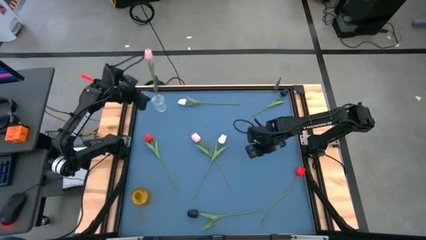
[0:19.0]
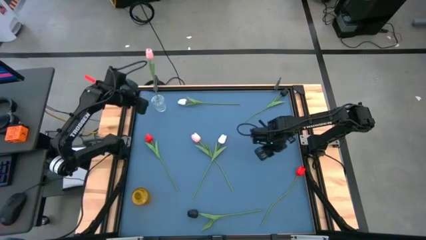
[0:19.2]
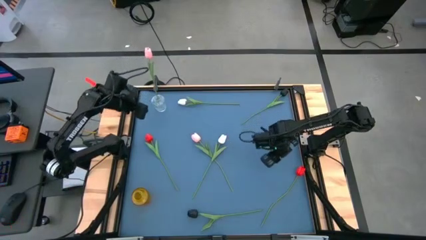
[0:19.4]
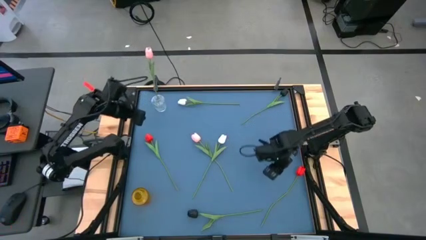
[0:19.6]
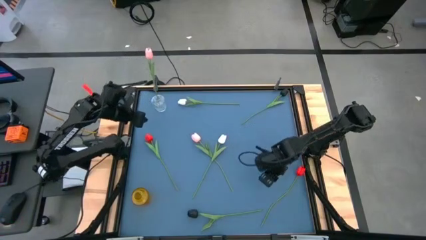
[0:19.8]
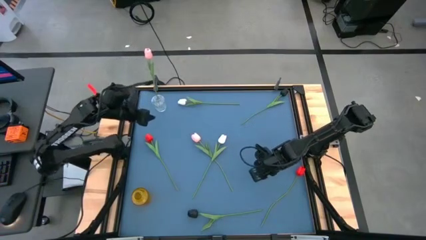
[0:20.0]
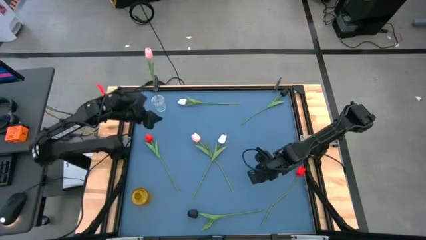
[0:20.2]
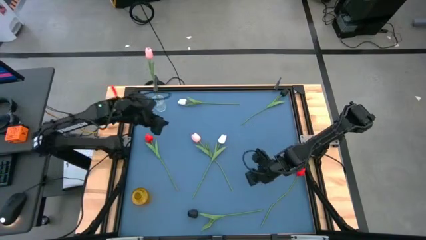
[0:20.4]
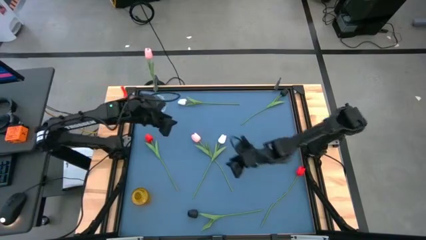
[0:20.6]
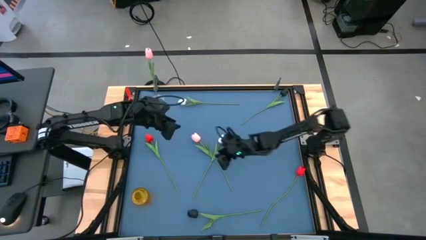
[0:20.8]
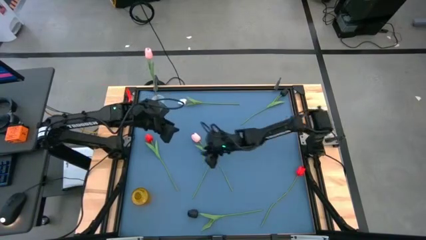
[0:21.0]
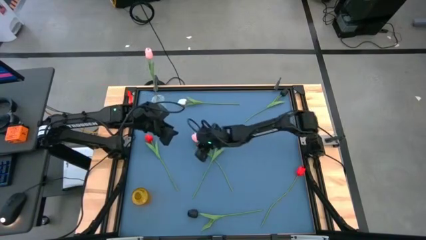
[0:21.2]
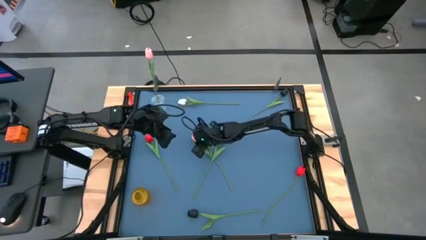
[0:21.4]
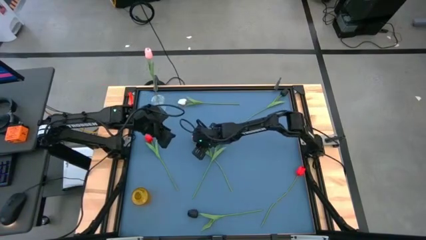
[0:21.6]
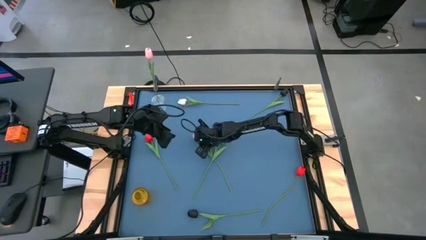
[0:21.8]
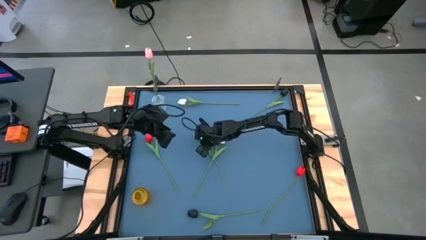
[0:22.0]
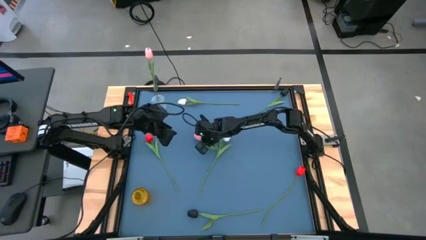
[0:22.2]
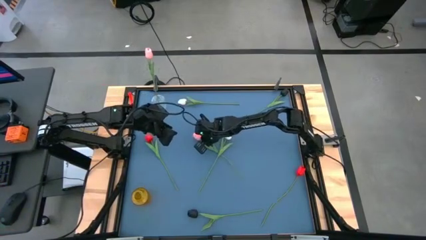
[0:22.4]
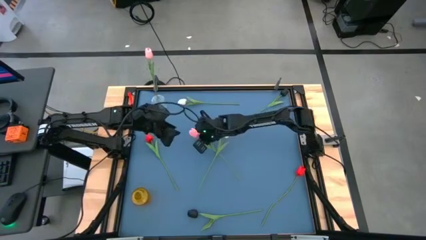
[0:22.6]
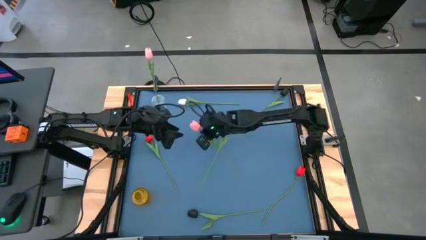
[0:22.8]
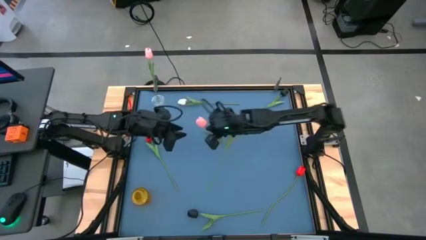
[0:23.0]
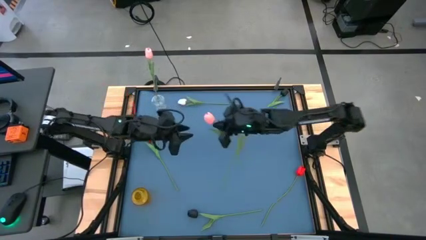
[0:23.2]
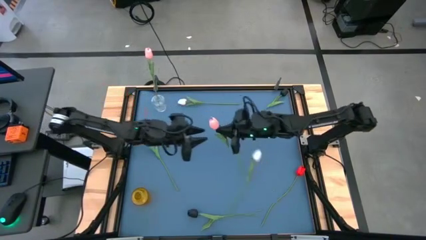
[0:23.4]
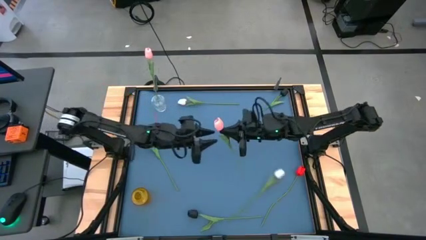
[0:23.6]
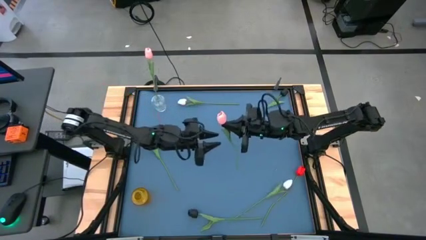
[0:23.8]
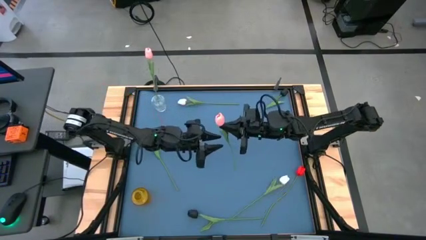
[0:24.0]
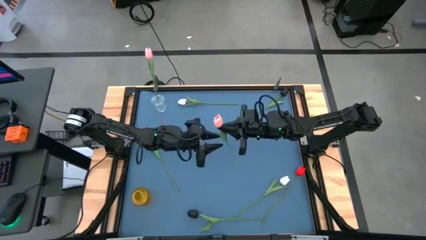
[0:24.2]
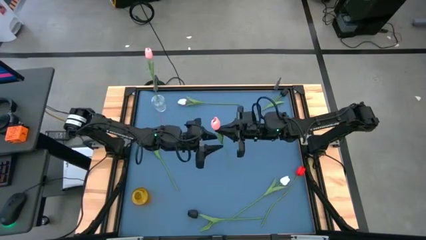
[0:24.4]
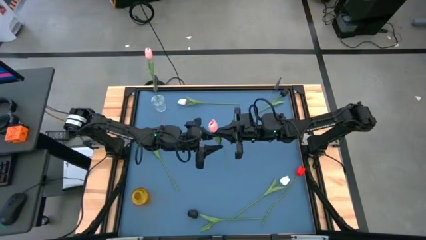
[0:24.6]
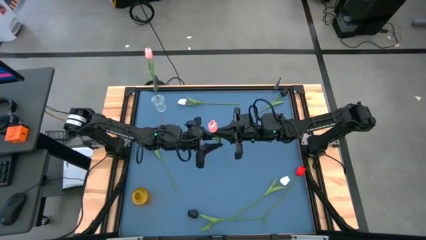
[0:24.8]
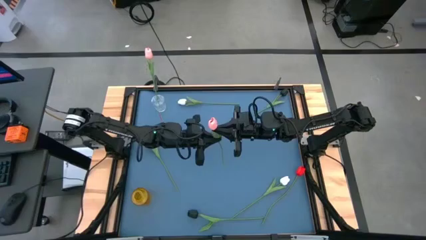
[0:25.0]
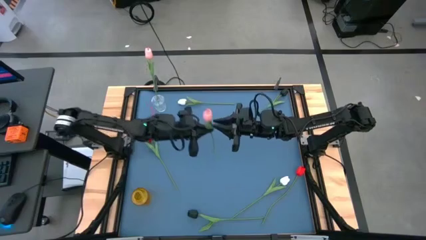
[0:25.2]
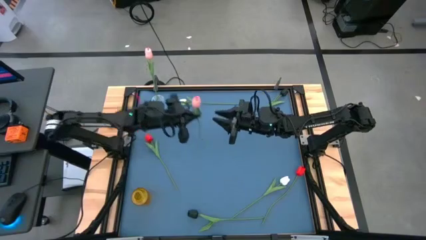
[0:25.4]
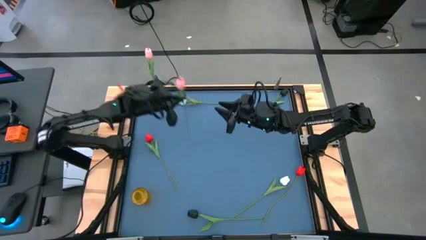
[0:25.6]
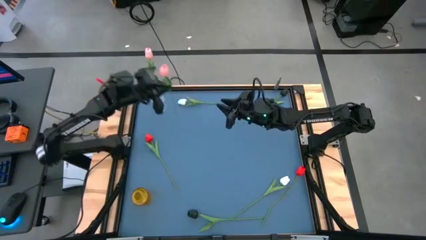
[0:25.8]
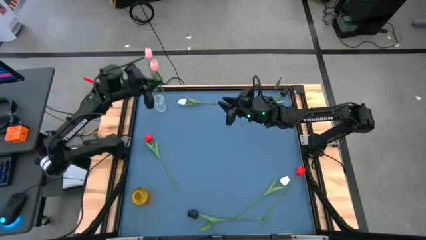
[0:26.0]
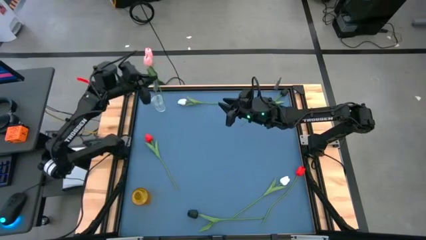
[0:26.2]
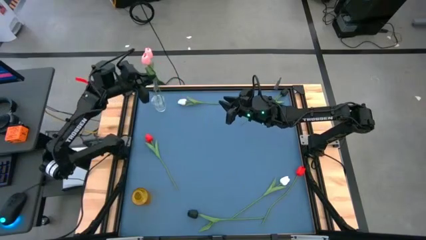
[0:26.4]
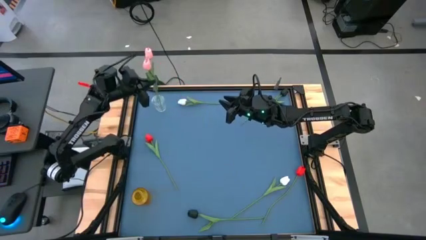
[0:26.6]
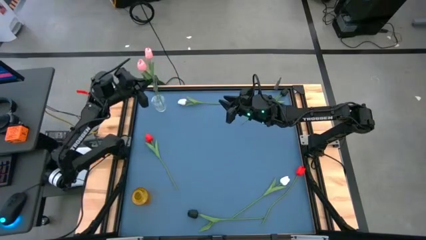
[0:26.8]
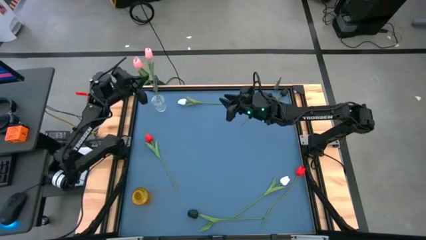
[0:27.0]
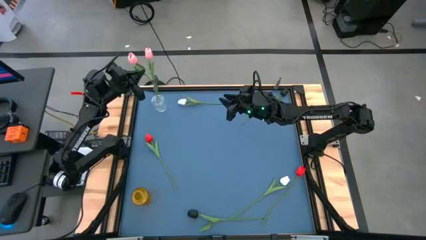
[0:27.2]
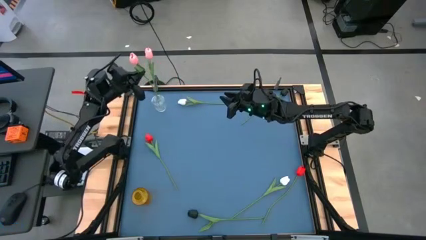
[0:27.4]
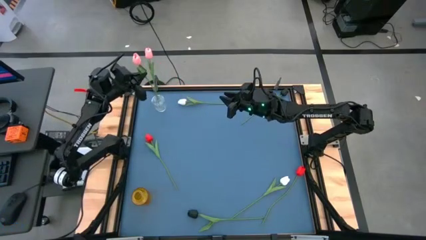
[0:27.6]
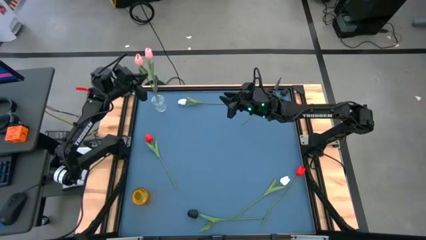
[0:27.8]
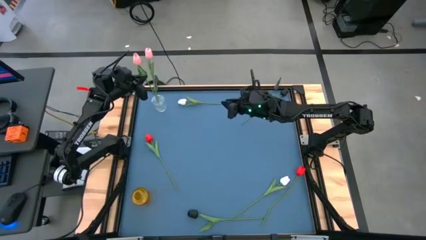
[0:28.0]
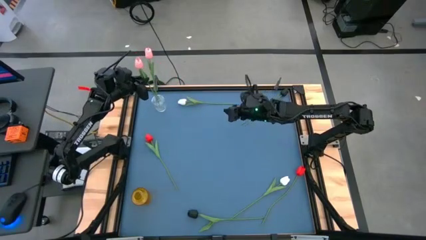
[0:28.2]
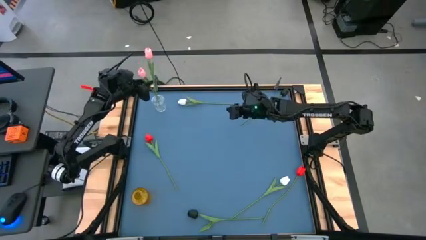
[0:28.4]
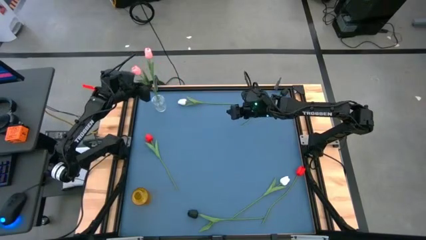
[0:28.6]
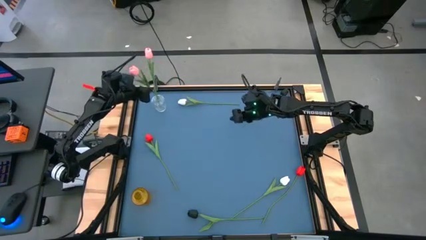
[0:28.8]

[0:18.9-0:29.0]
Task: Sort flowers into vase by color
Put the pink tulip into the transparent vase
